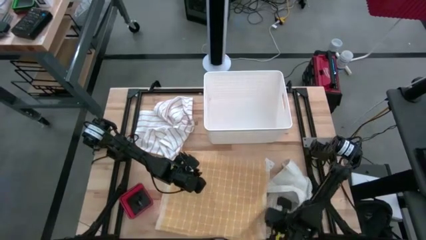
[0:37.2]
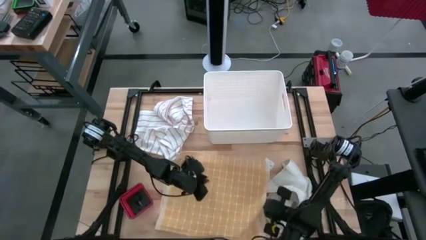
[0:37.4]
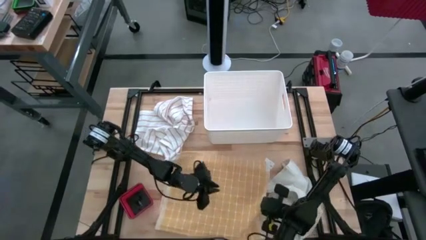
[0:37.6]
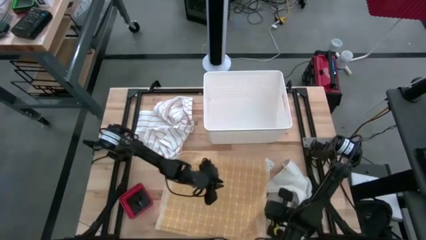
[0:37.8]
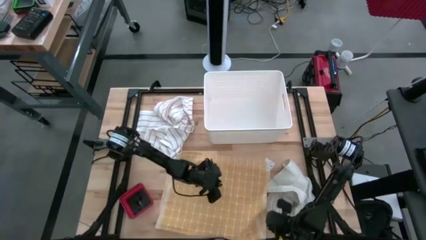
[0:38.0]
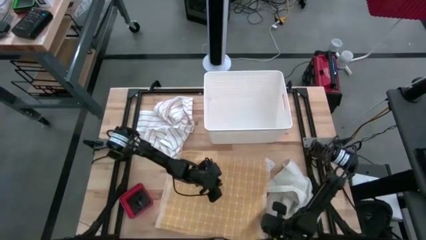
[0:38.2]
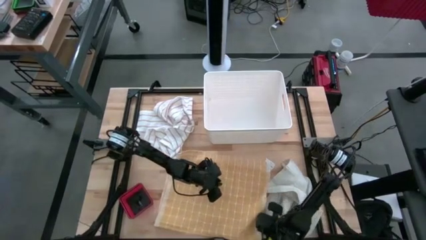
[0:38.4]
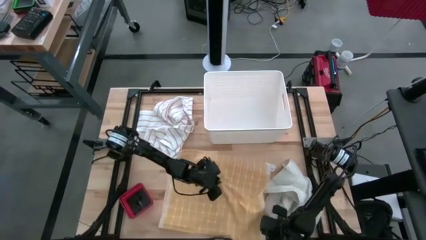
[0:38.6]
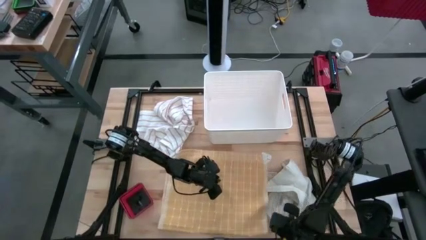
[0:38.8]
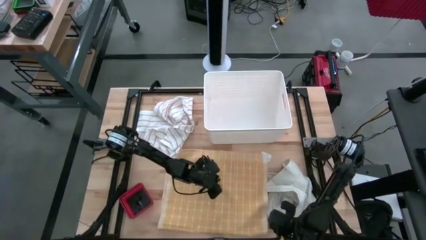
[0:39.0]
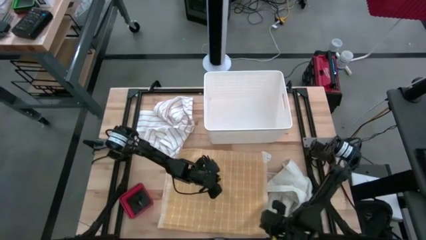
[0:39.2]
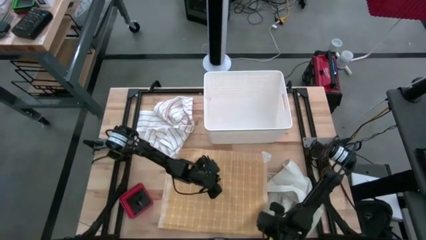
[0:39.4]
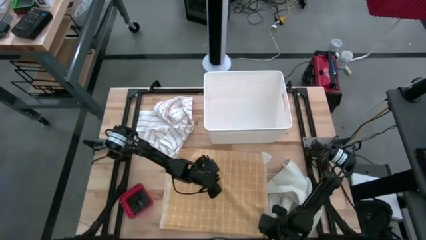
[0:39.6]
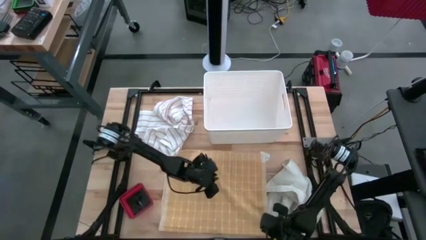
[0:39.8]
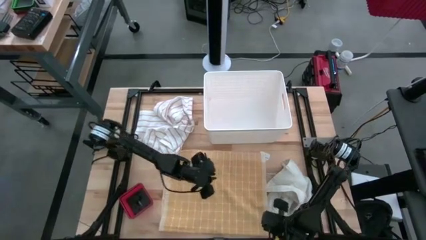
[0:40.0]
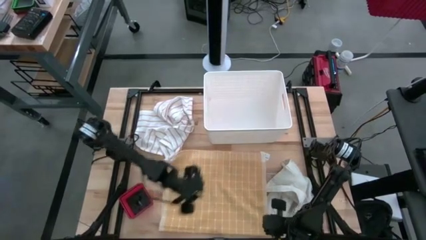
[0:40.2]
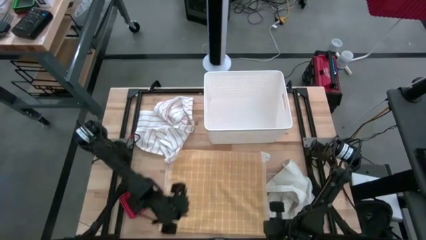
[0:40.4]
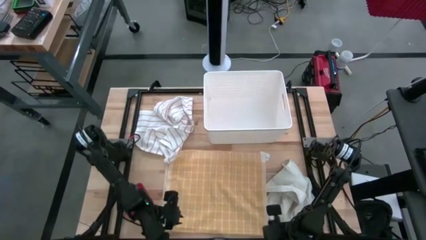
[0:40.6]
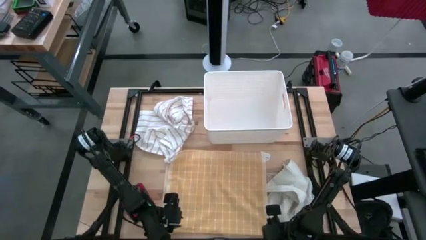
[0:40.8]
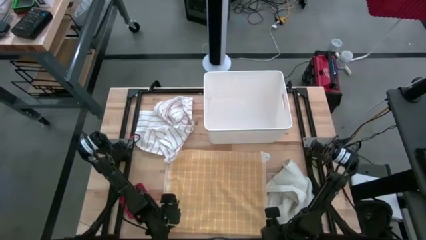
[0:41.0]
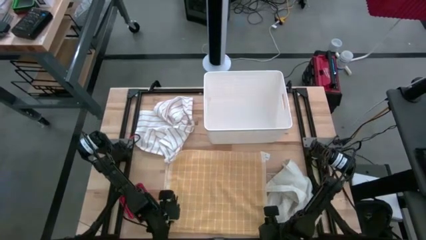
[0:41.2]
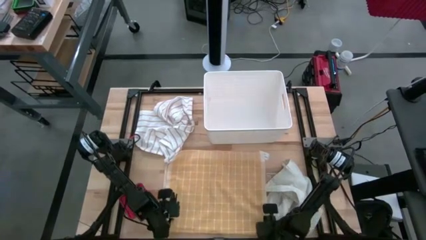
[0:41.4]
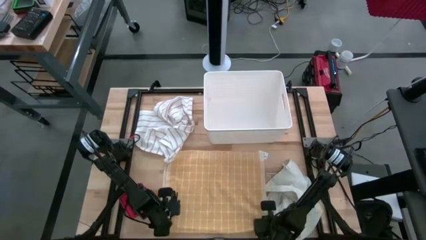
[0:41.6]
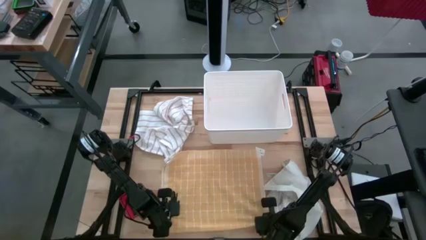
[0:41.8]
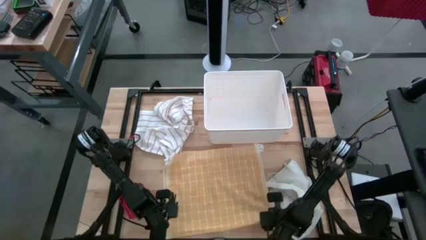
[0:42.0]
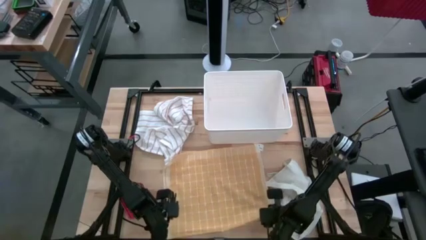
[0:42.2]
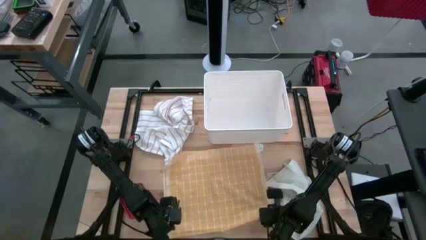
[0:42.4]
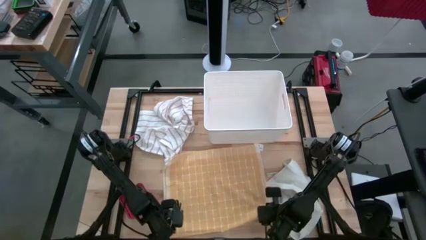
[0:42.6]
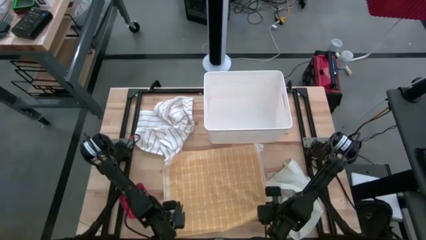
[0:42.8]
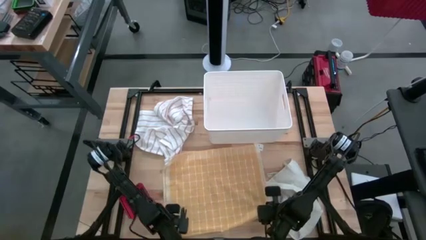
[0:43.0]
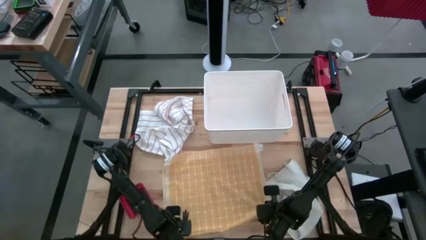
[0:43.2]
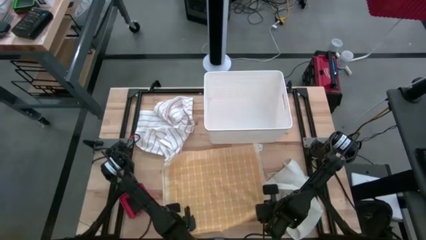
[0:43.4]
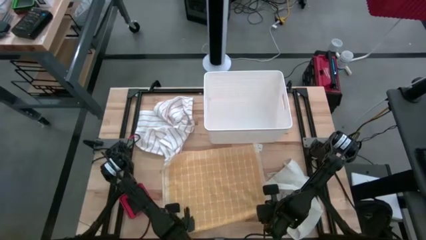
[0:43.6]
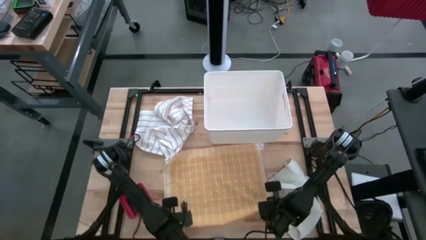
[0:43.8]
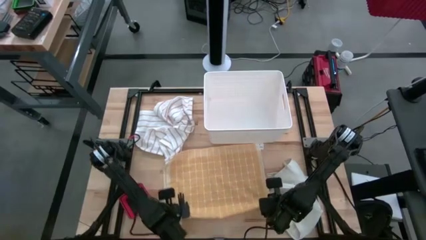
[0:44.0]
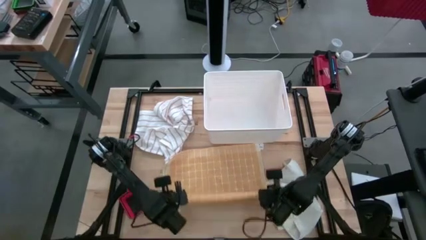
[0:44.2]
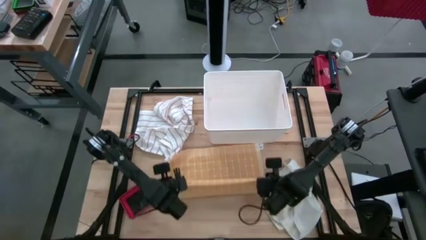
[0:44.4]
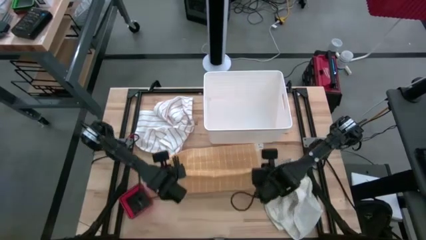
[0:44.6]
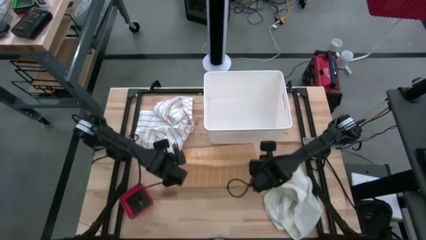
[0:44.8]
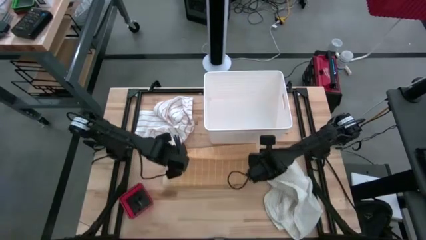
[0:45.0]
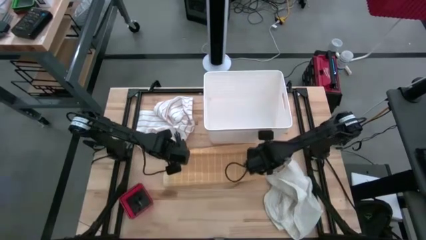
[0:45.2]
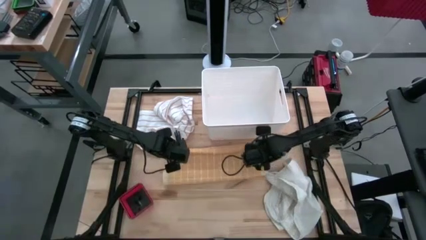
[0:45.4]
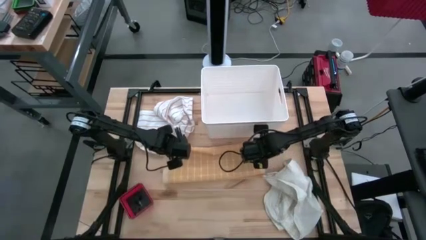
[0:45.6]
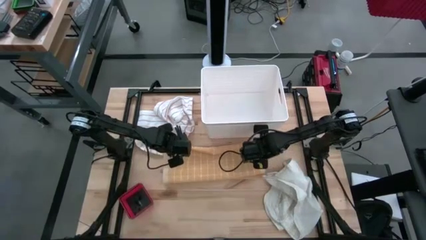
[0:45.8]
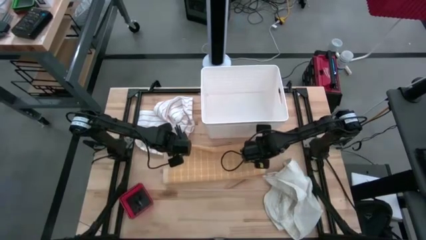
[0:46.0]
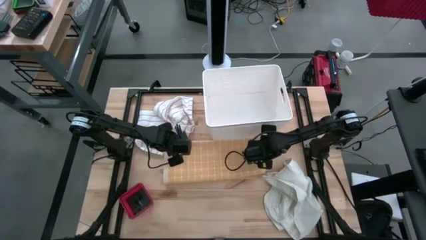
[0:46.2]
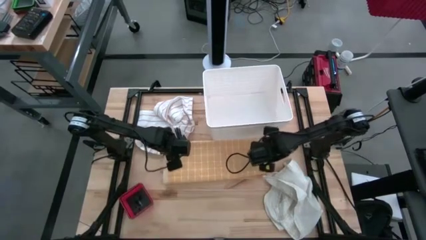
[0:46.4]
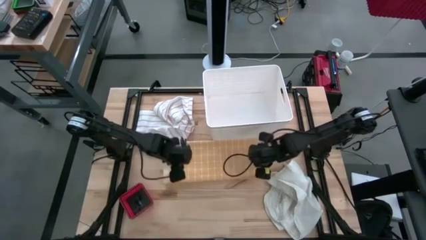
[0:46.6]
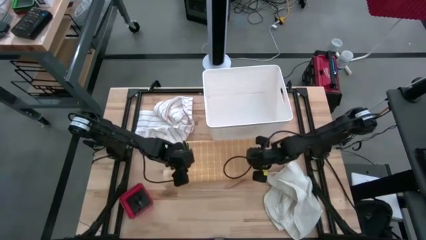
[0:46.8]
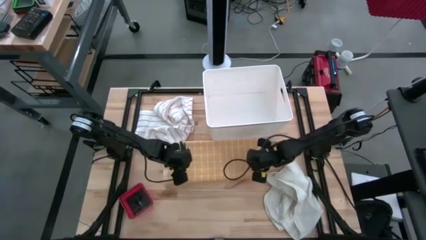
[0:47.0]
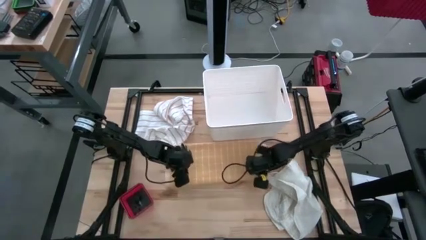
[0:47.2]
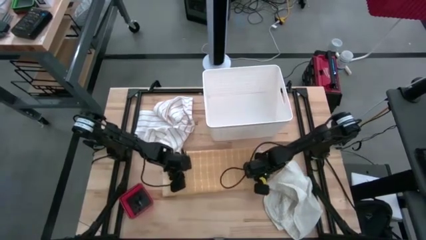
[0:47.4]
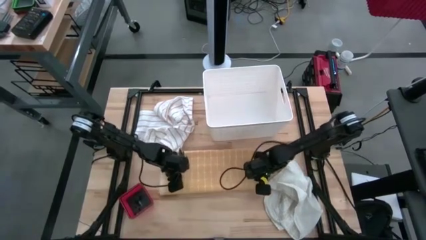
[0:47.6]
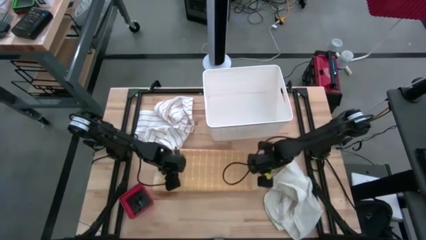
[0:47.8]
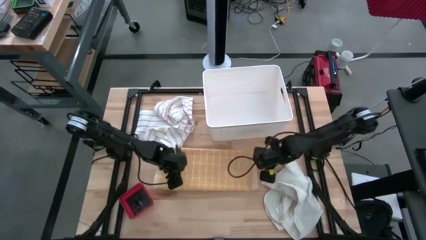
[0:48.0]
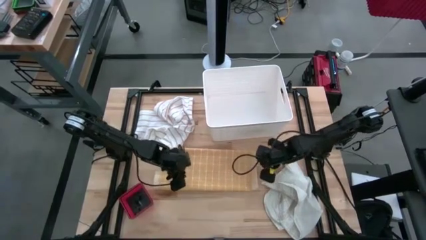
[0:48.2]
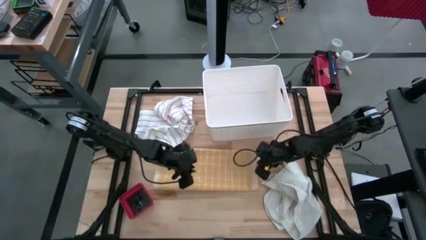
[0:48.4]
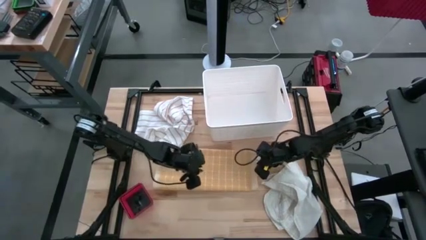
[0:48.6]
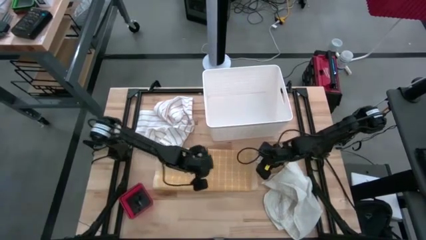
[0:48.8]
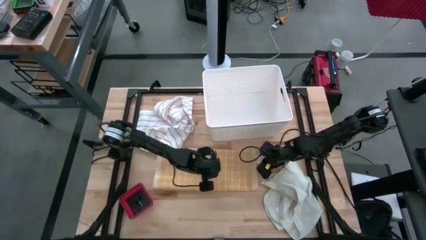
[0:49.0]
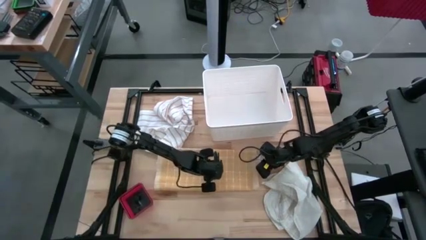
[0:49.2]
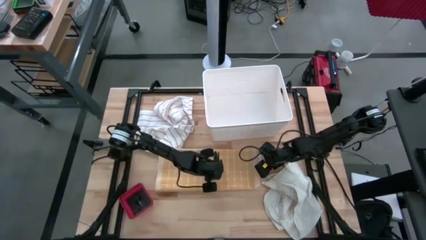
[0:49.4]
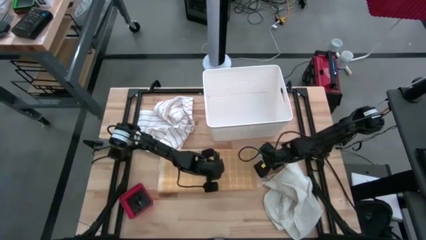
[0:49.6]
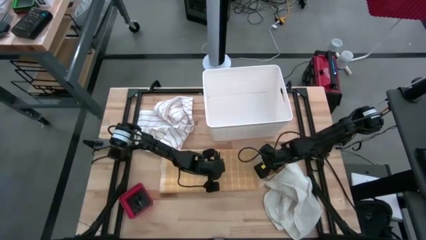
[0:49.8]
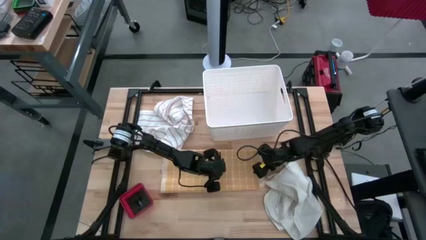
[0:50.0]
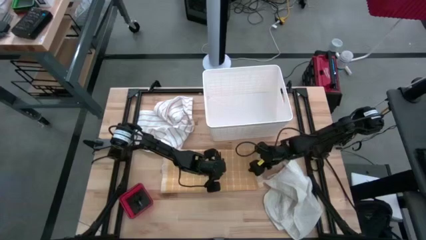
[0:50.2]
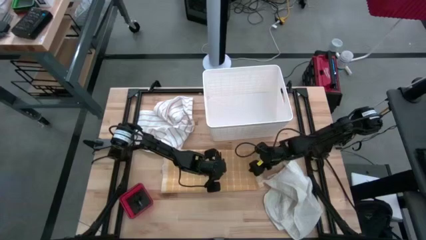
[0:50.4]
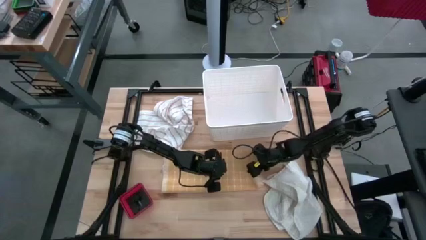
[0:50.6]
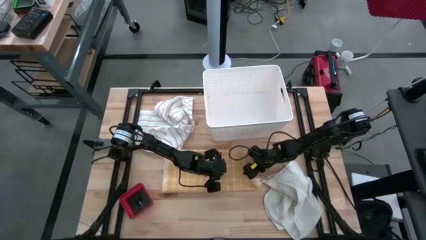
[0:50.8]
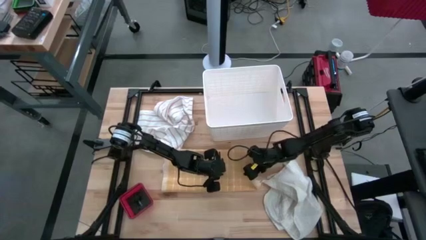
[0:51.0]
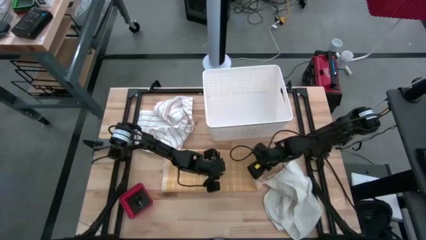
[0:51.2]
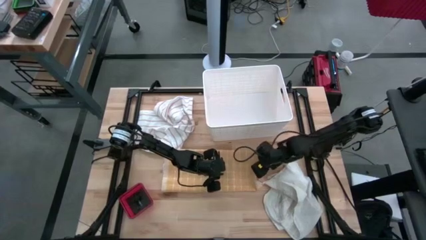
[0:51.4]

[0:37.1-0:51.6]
Task: Fold towel
Fold the yellow towel
